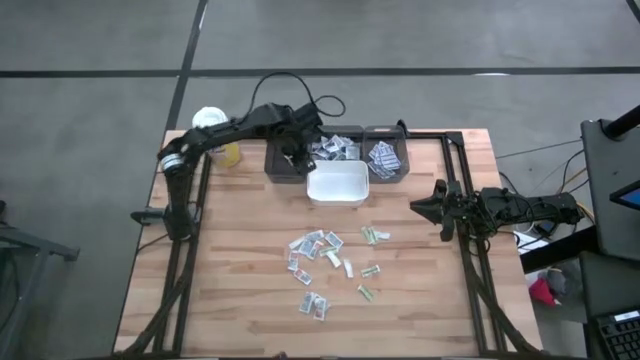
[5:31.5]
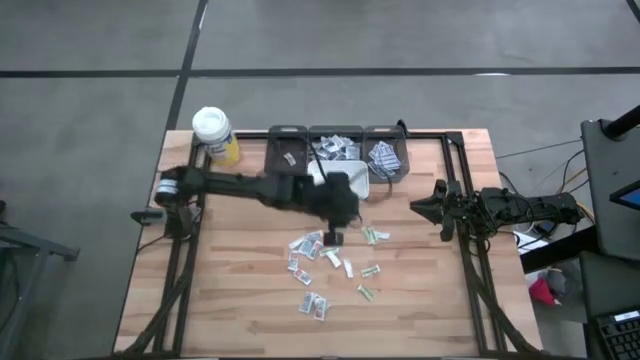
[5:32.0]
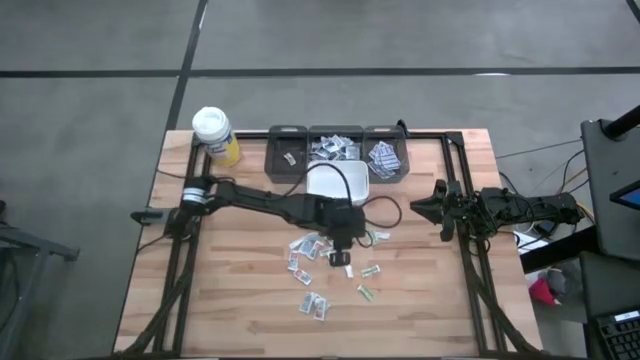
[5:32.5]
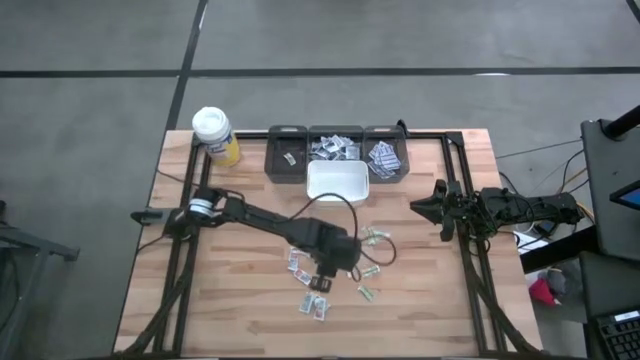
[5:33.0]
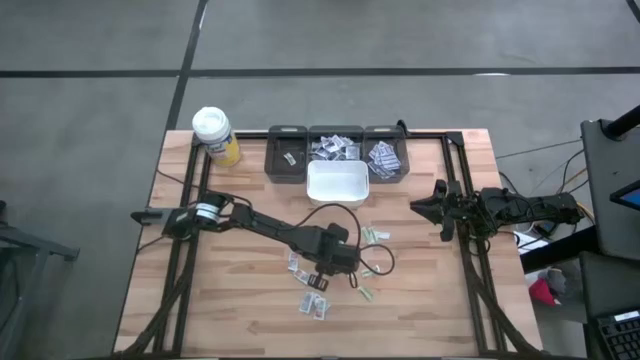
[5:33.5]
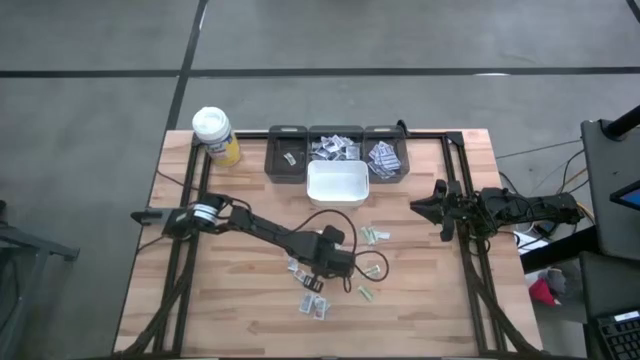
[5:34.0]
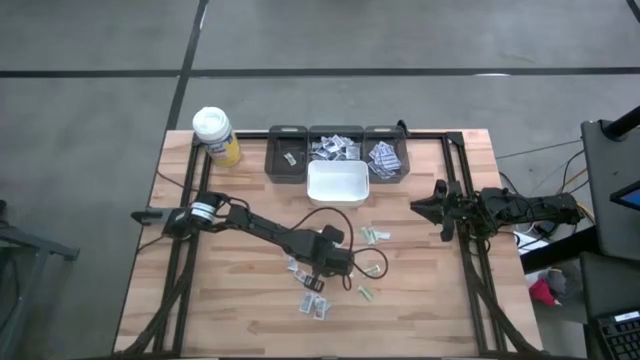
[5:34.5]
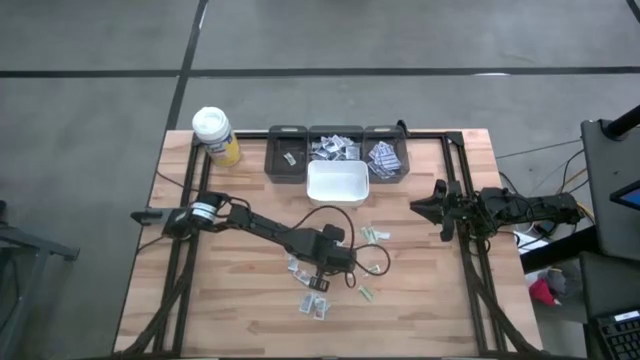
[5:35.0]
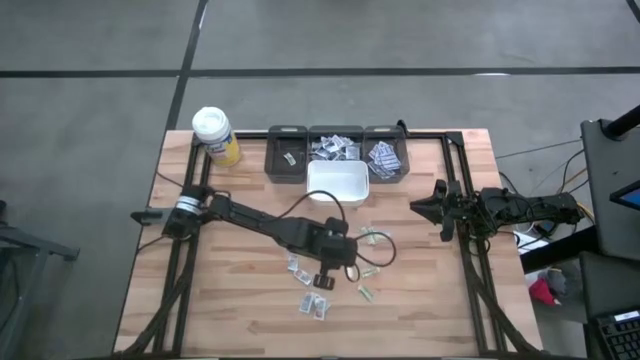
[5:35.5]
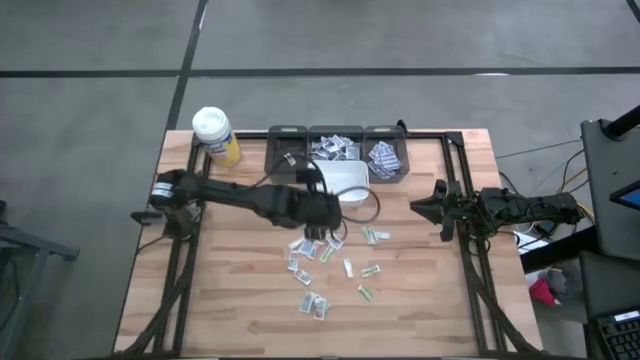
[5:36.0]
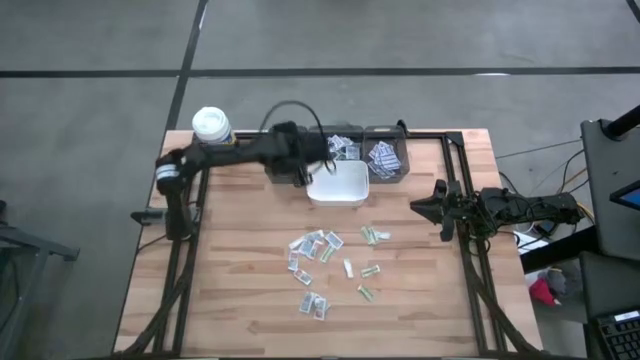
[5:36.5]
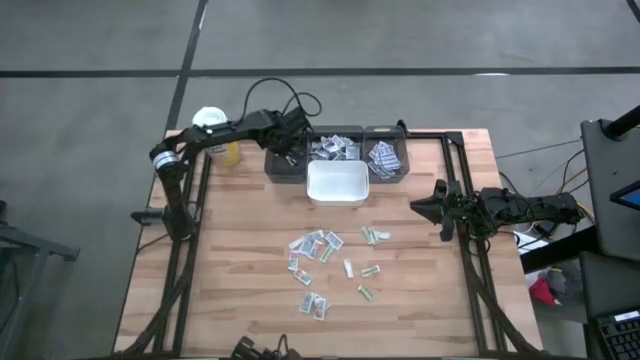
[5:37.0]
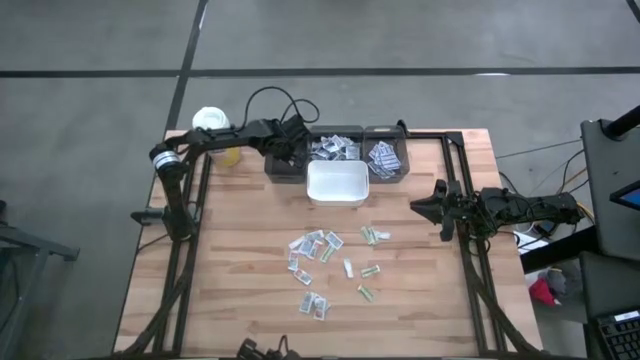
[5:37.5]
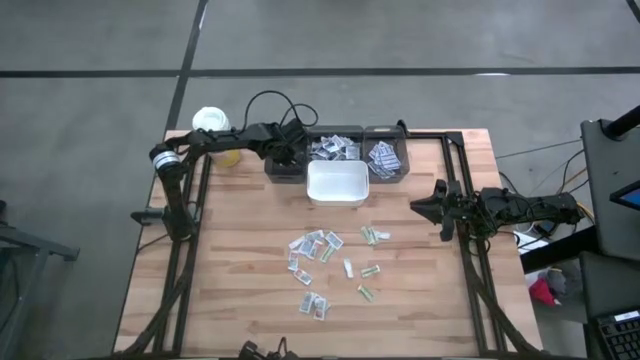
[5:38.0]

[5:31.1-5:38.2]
Task: Pick & Place First Aid Supplies
Put the green bandage pack into the left black bin

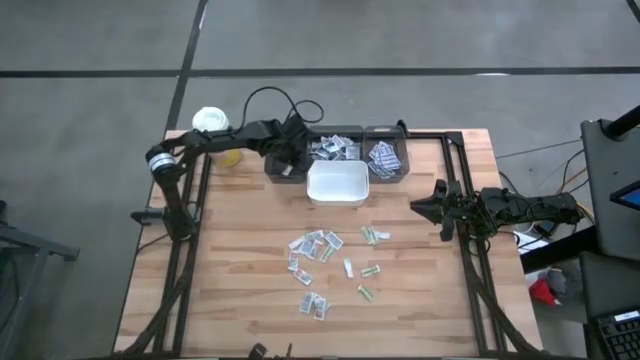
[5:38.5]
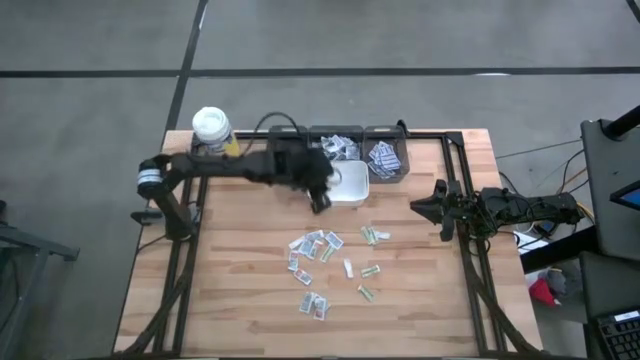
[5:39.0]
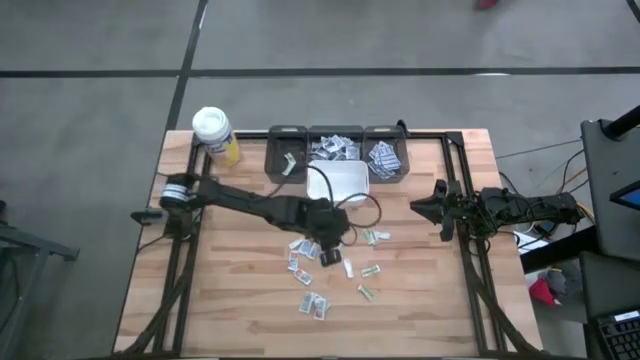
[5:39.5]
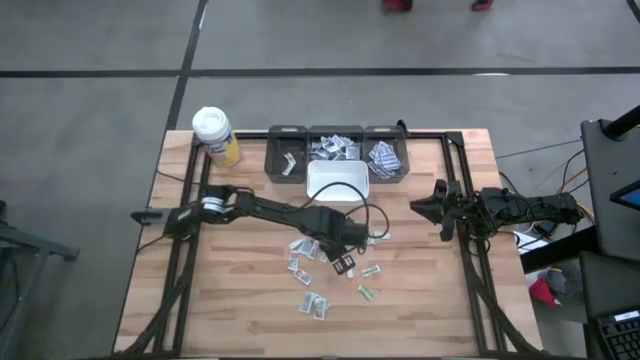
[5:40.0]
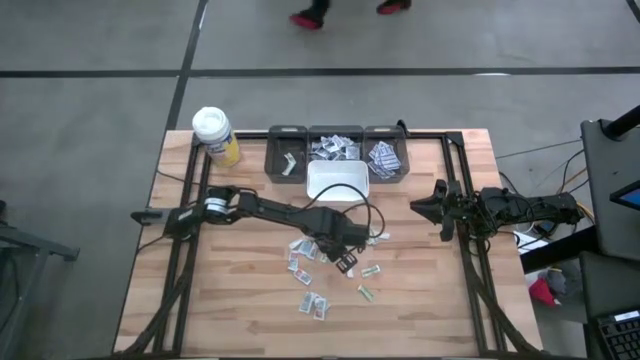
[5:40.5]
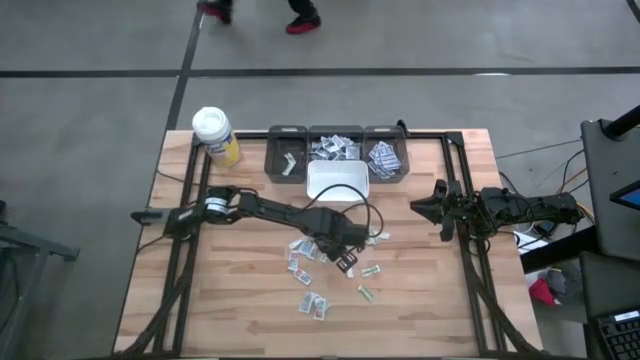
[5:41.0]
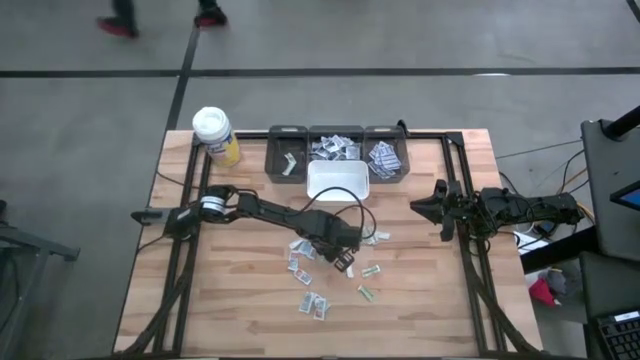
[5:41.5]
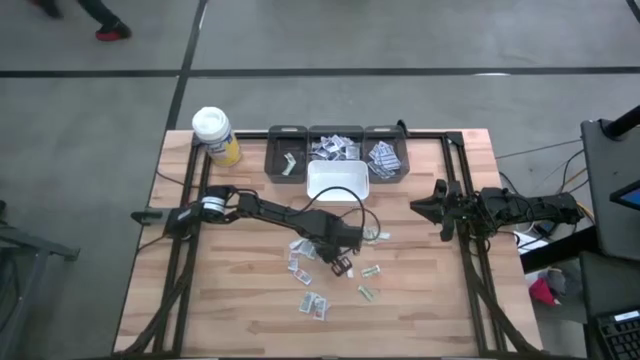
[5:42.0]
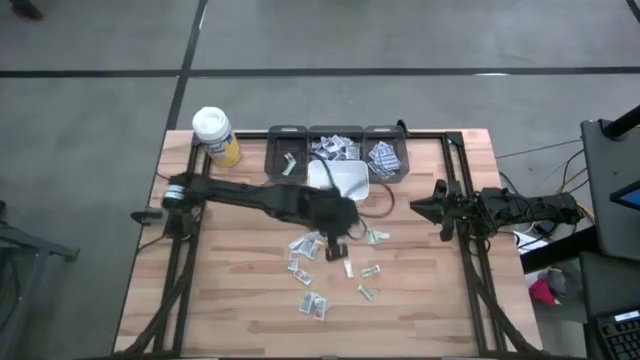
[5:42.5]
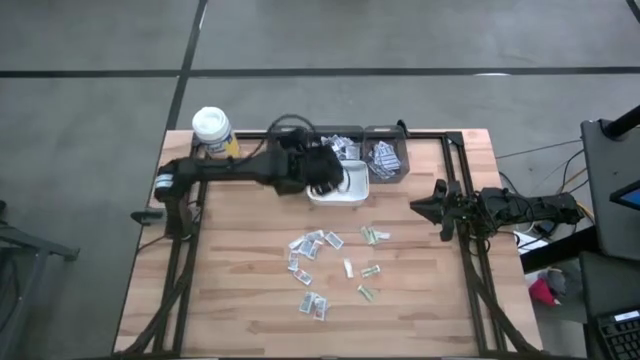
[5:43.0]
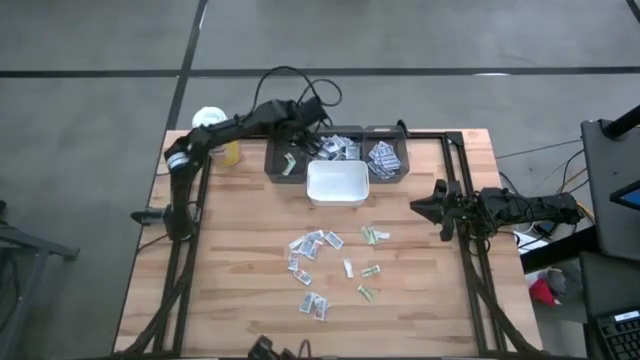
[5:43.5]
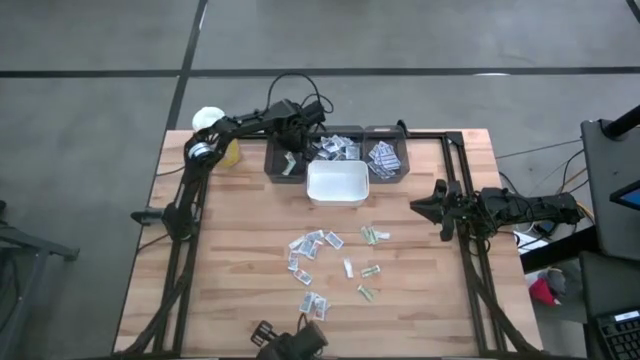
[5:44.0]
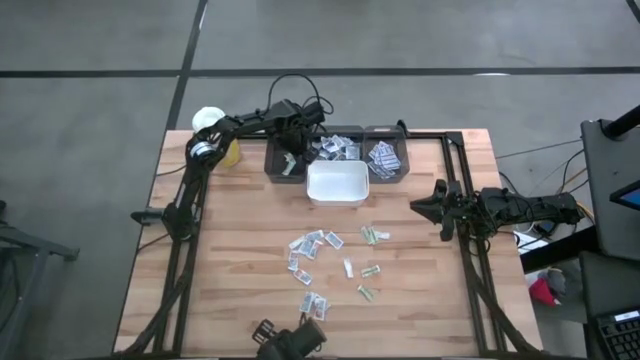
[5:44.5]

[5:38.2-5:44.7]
Put the green bandage pack into the left black bin

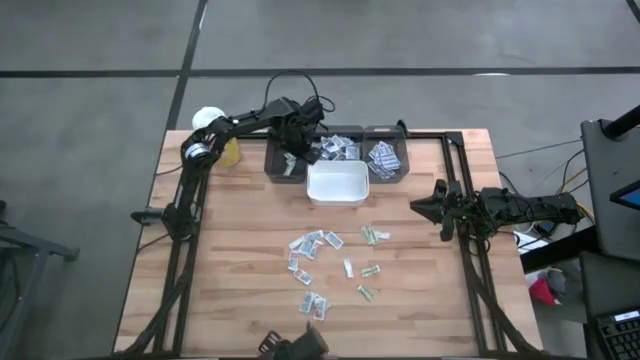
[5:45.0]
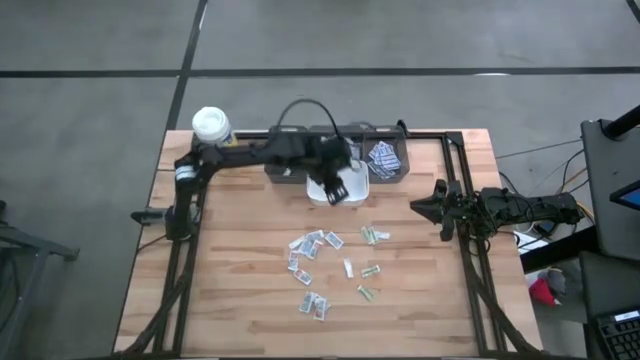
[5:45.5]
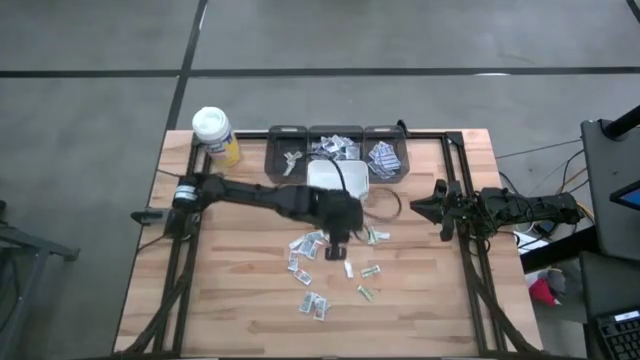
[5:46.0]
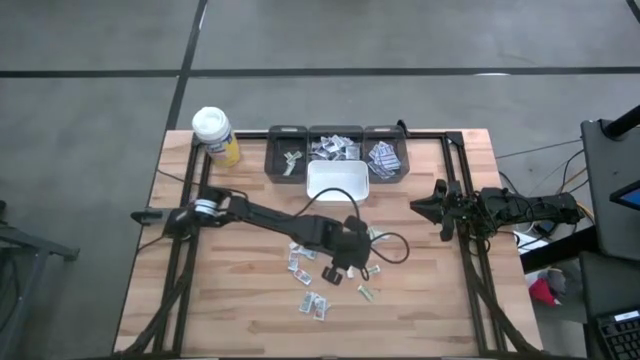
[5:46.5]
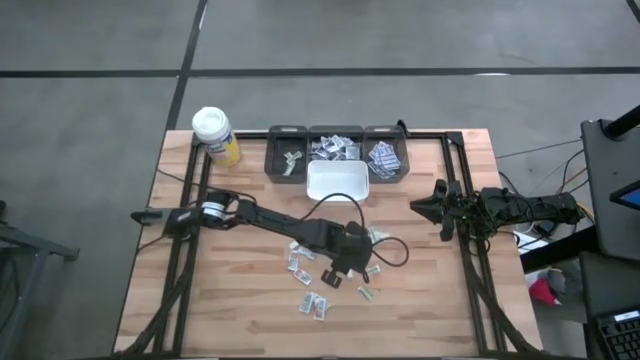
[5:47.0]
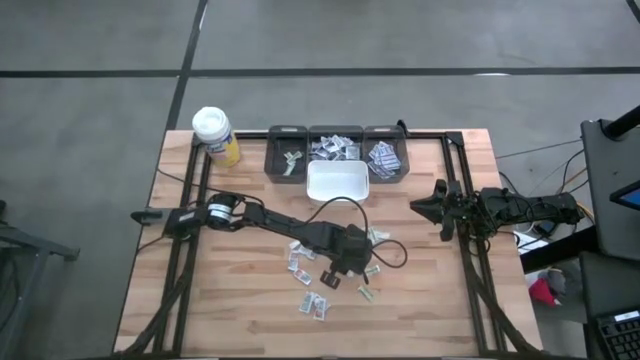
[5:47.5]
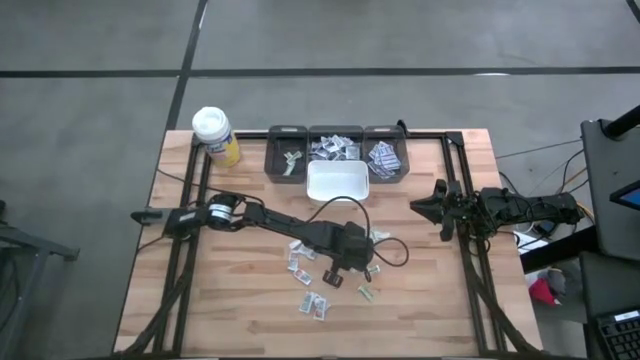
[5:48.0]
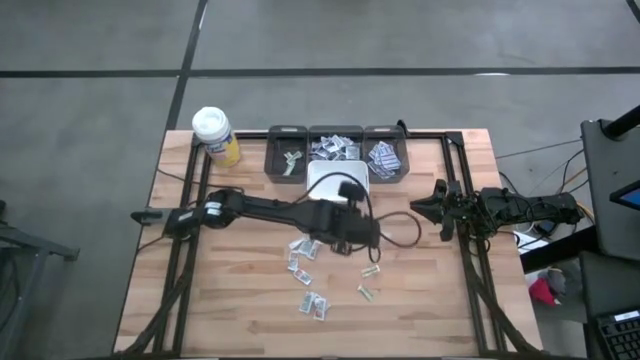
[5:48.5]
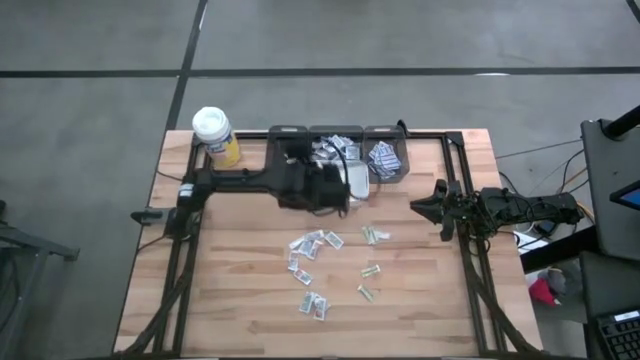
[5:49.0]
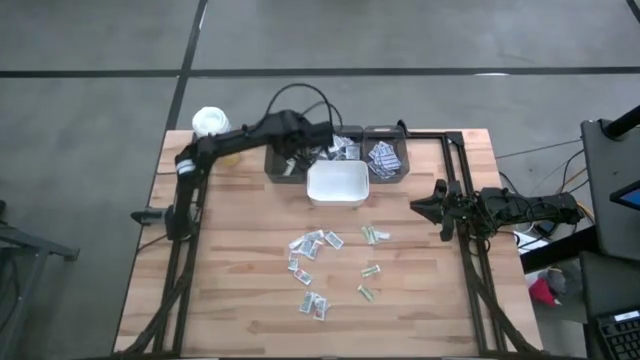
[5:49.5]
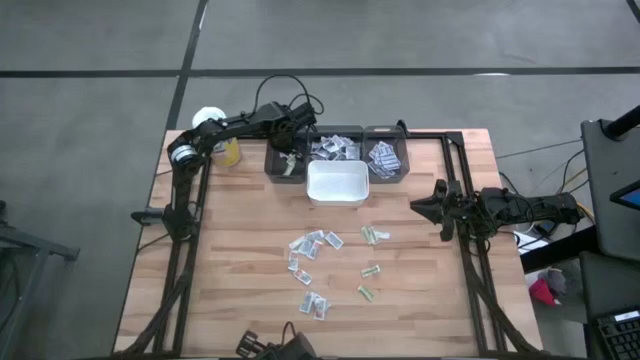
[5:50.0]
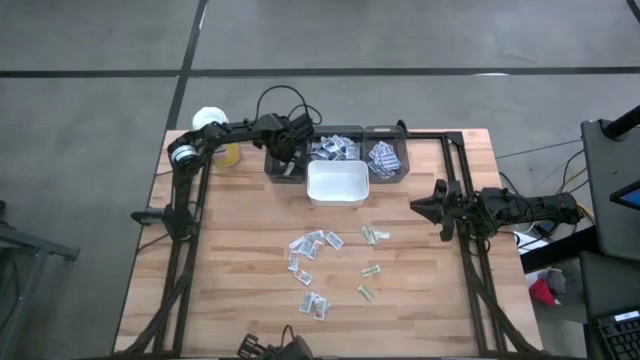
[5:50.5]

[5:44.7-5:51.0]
Put the green bandage pack into the left black bin
